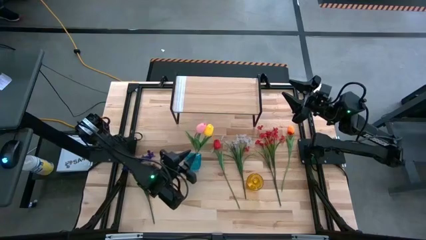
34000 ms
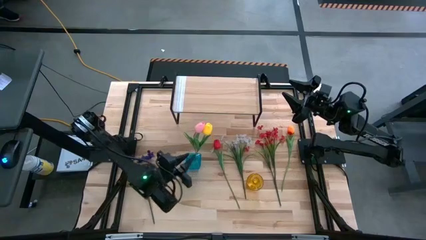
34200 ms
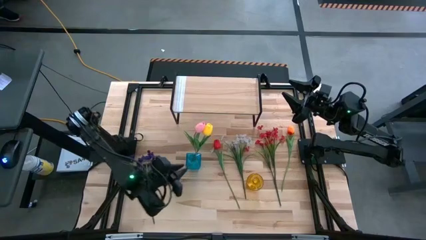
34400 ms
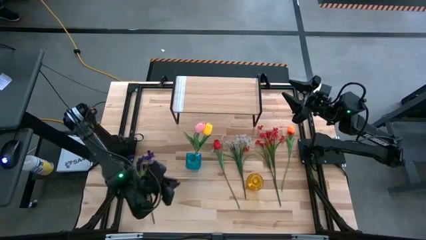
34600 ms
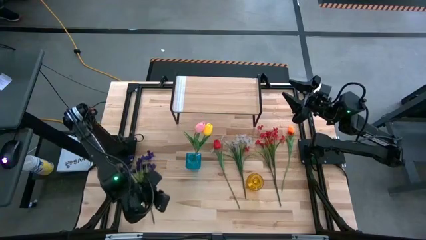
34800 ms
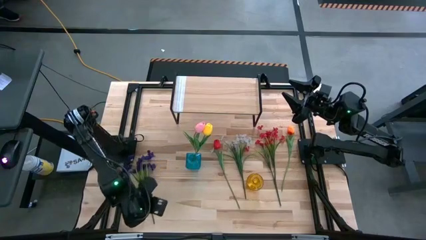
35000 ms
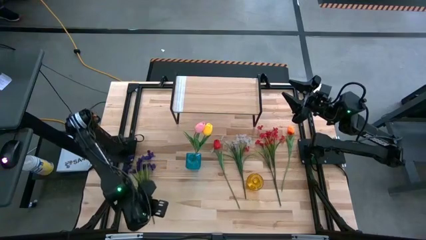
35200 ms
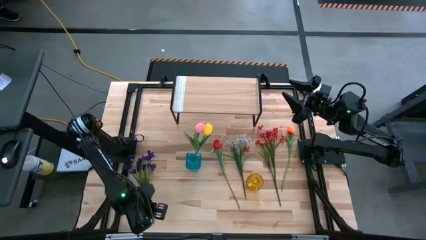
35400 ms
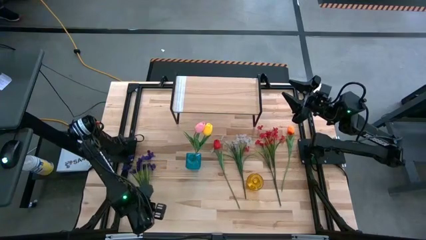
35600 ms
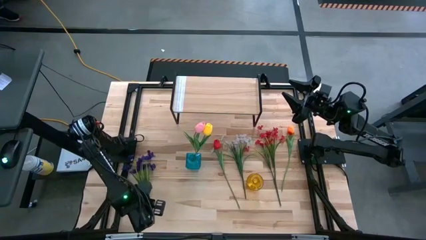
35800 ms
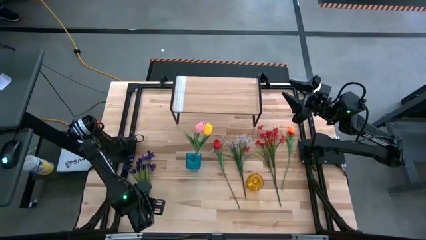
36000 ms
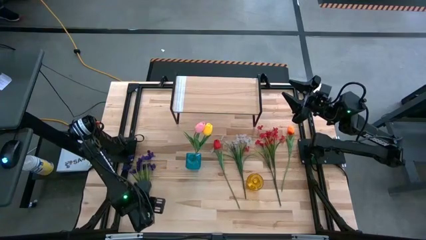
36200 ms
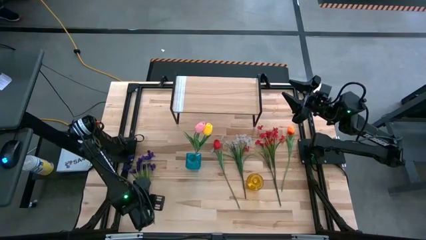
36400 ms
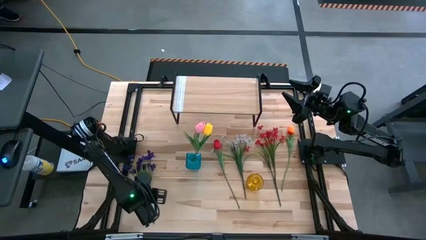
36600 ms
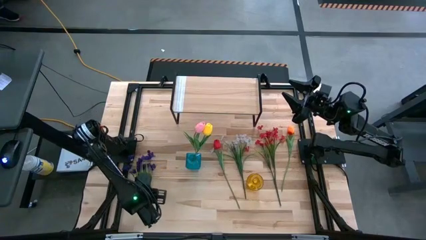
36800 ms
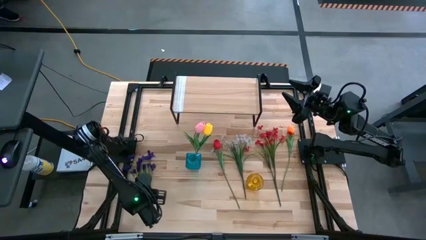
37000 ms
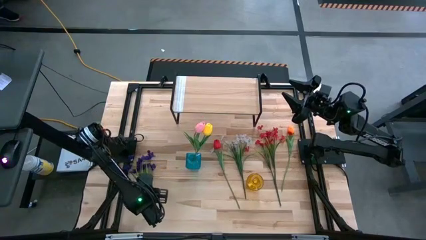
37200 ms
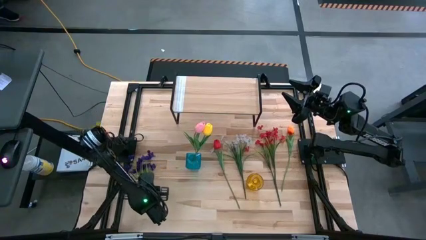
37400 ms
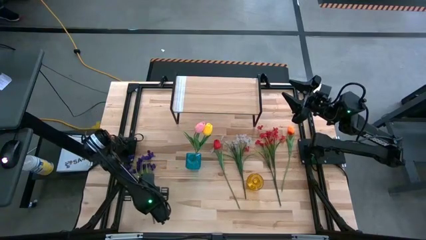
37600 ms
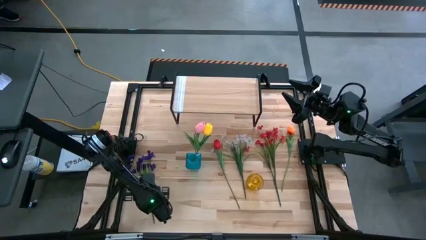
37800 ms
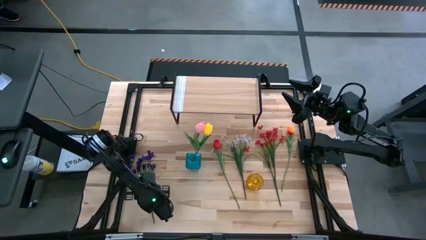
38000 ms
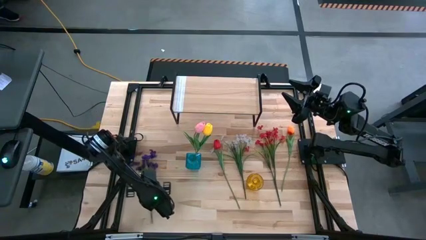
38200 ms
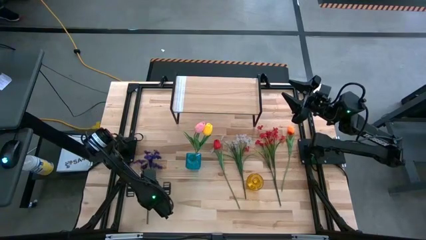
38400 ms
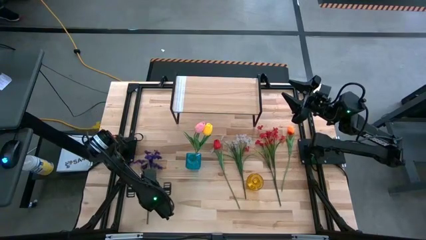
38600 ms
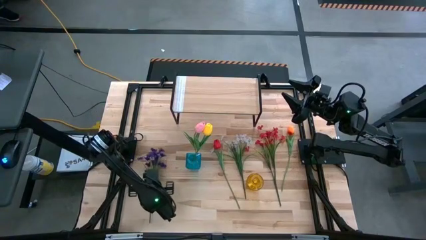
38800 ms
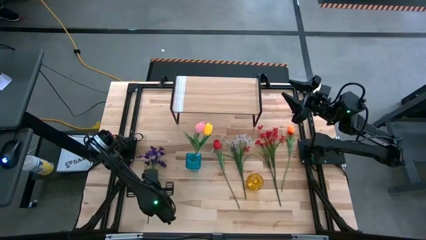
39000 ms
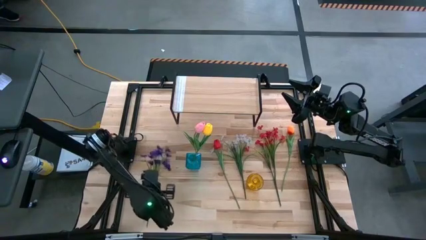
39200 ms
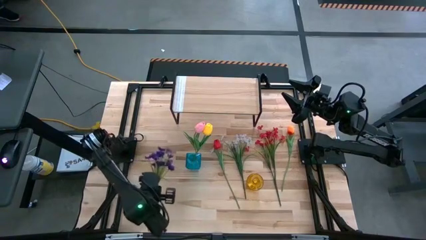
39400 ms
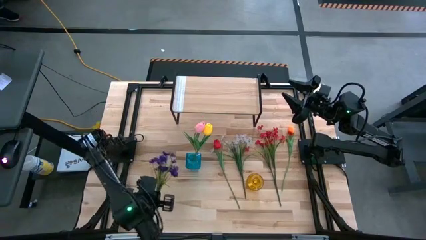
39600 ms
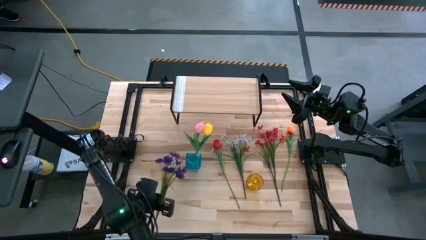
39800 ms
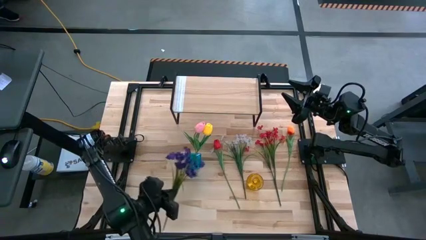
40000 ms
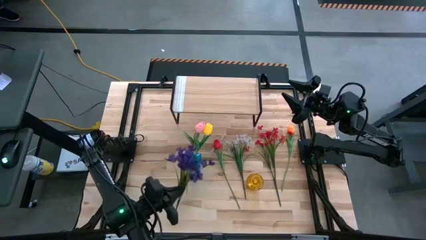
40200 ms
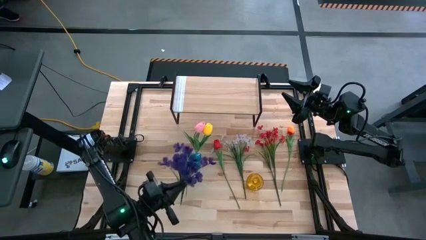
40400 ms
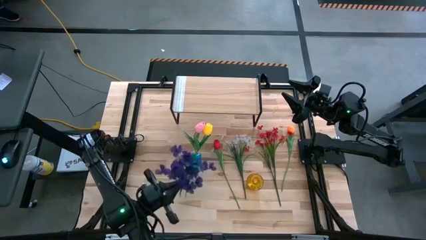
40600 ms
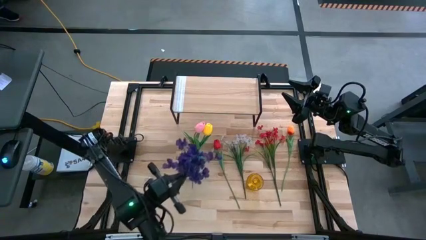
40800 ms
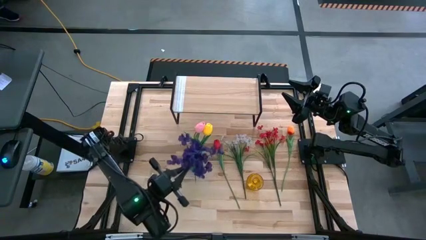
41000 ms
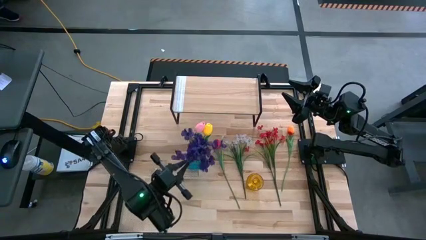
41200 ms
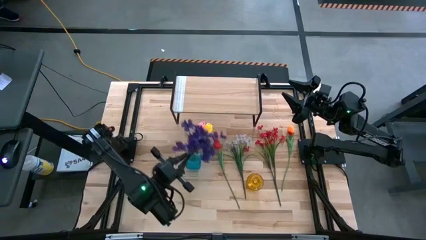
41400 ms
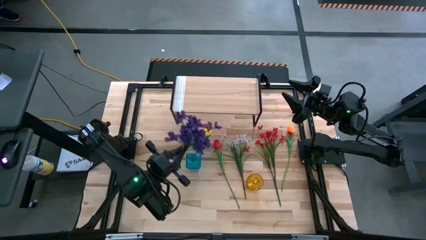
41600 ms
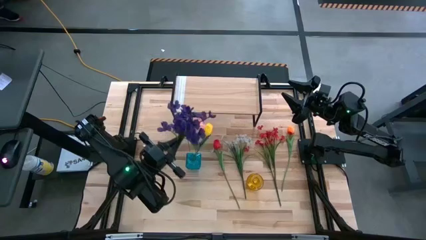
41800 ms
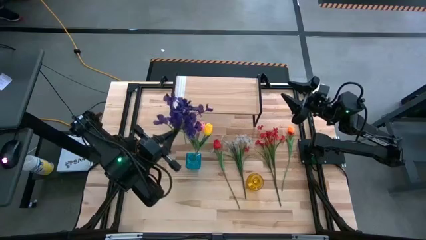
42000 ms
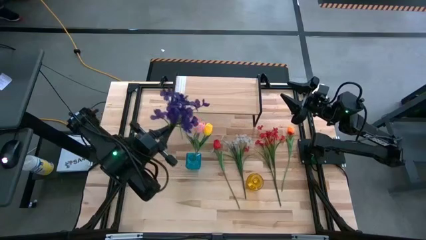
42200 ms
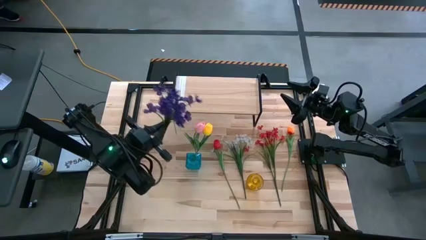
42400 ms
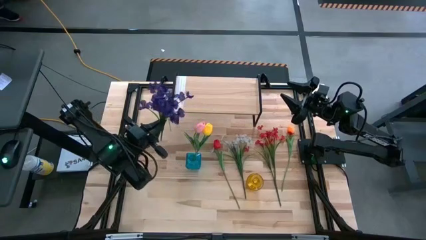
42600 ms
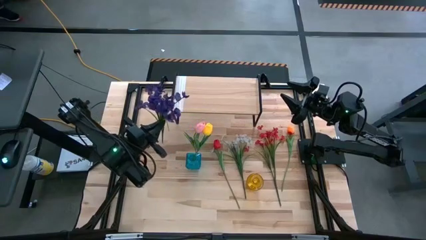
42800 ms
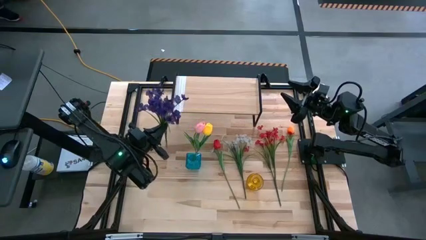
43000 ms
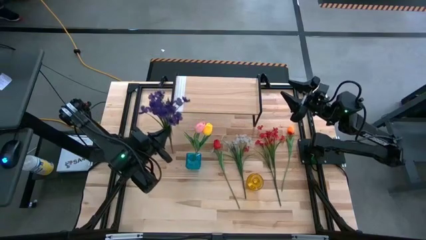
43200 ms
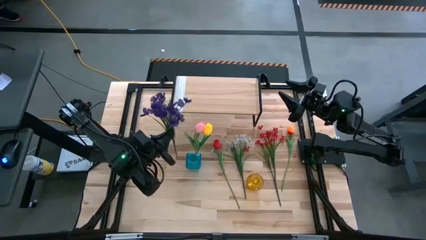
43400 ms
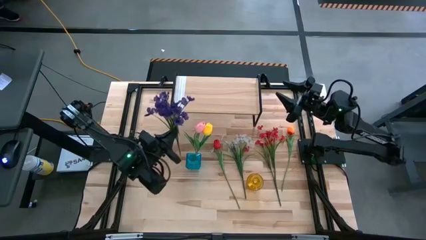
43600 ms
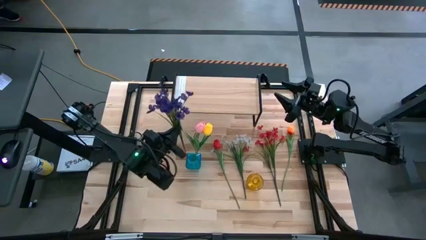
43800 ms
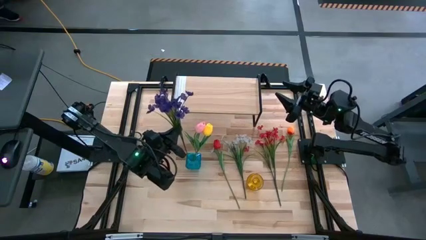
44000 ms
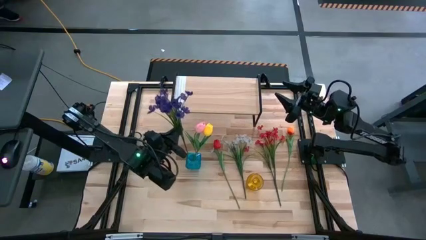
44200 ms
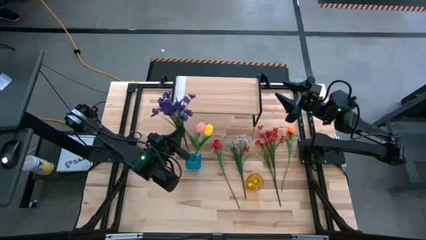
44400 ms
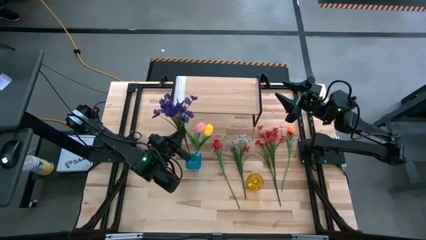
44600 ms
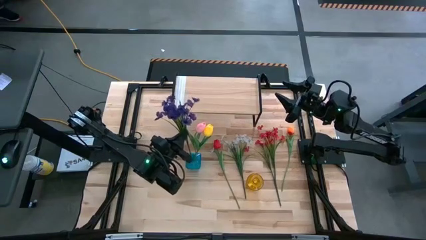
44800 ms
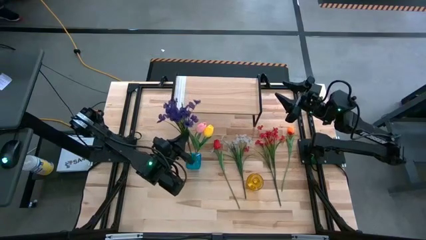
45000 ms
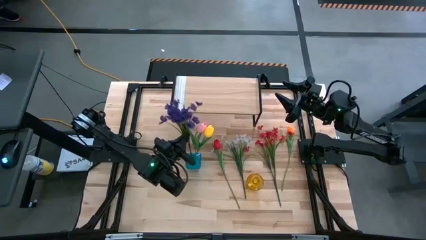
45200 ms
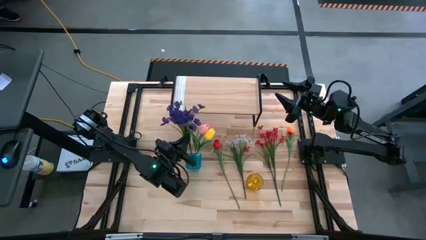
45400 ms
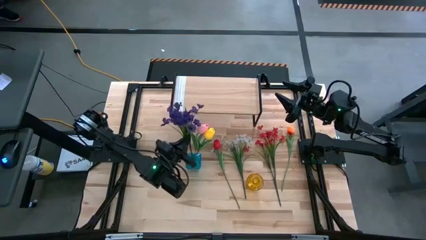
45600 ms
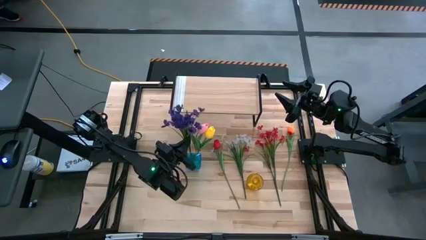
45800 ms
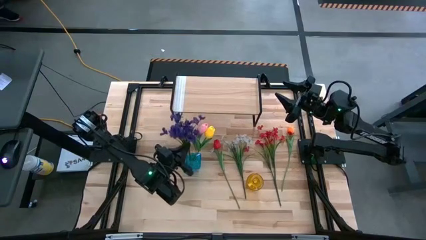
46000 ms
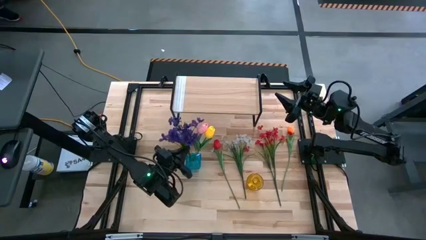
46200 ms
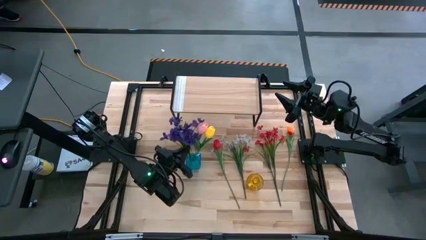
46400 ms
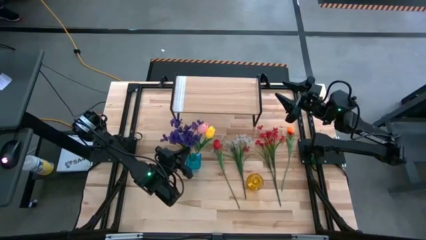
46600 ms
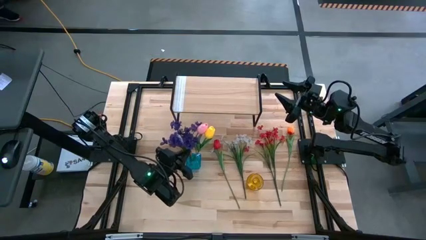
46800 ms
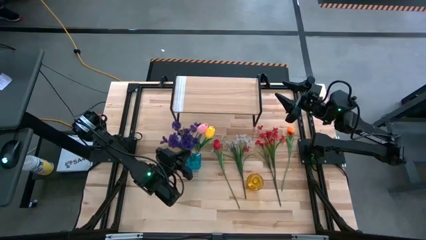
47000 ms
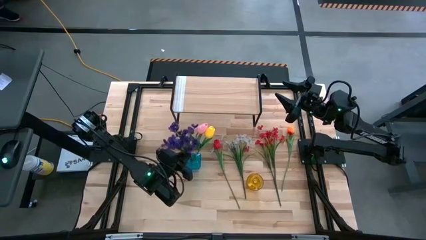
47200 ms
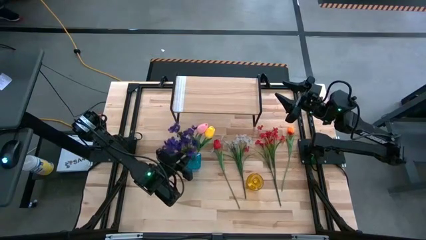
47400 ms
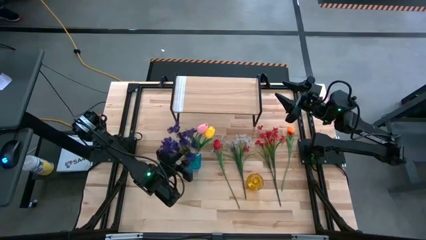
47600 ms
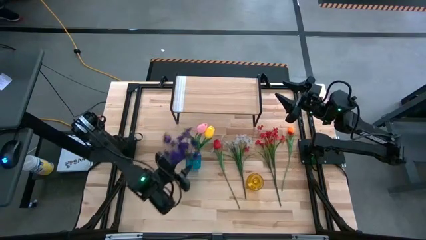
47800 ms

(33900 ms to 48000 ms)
Task: Pick and place flowers into a vace then onto a shelf
Put the purple flowers into the blue vase
